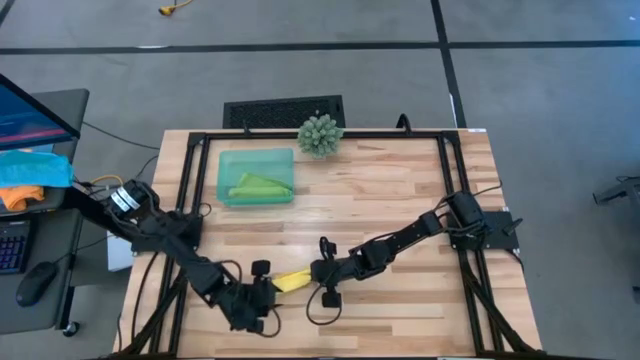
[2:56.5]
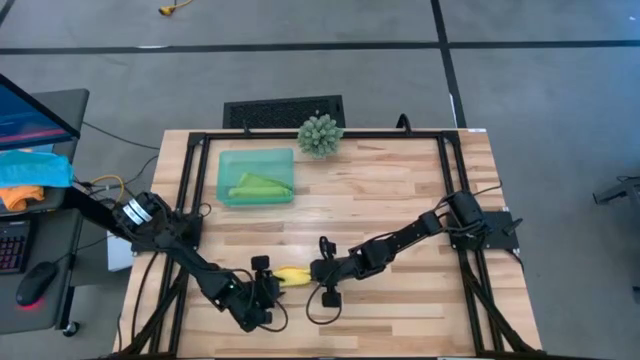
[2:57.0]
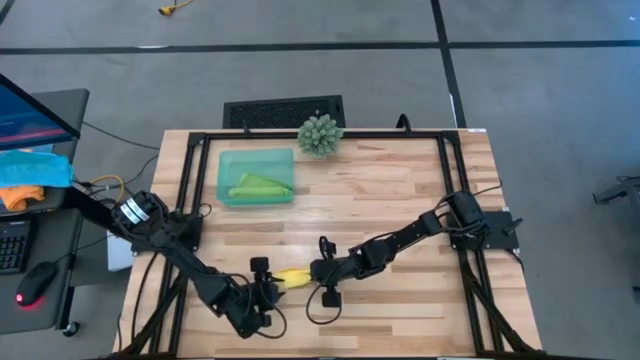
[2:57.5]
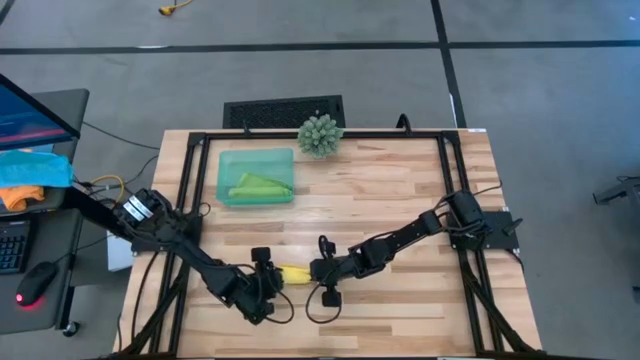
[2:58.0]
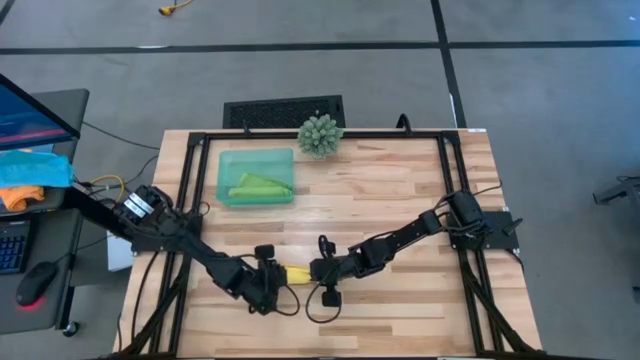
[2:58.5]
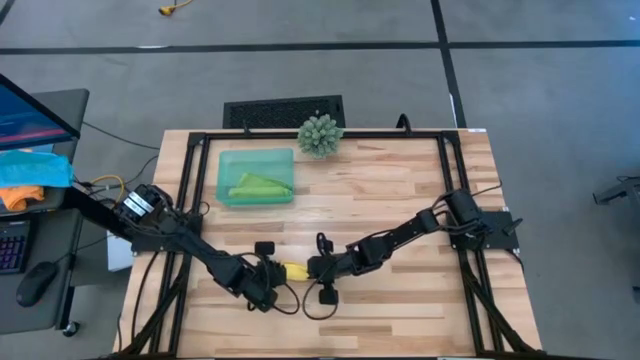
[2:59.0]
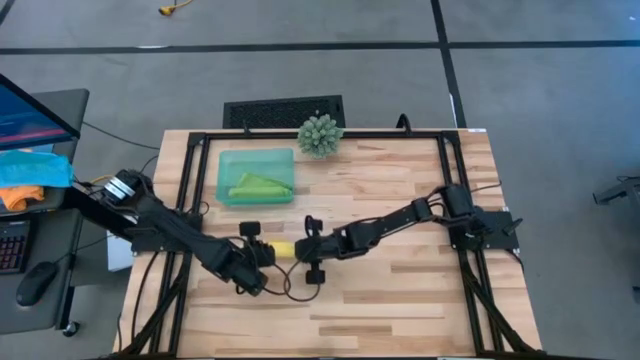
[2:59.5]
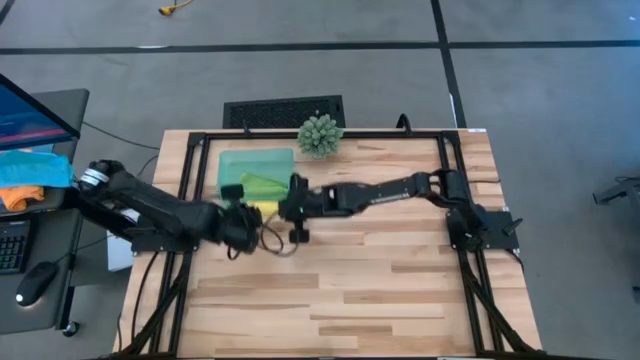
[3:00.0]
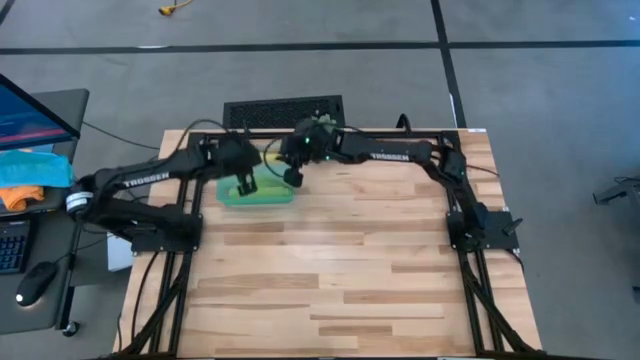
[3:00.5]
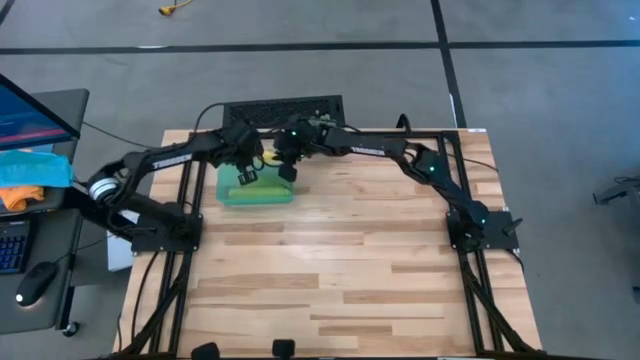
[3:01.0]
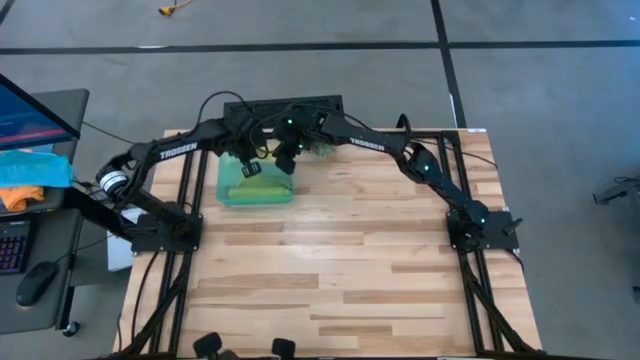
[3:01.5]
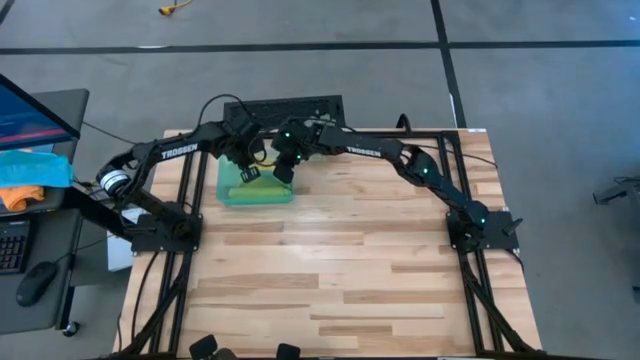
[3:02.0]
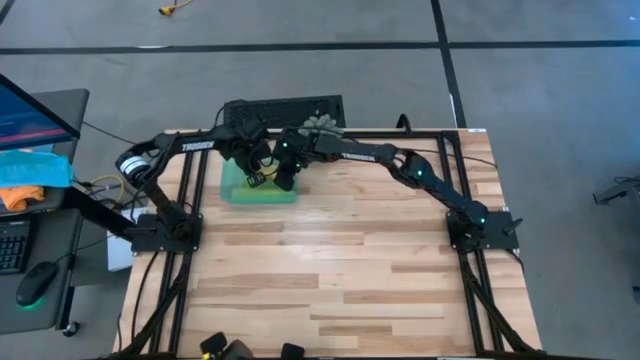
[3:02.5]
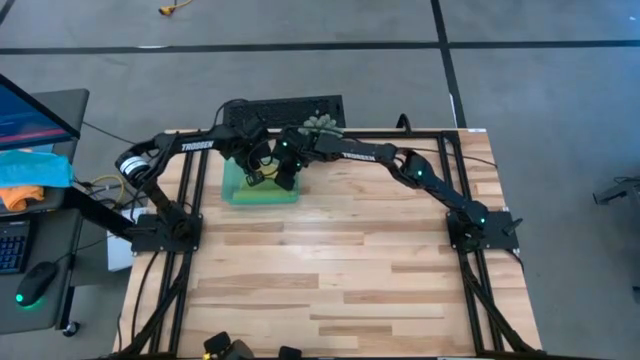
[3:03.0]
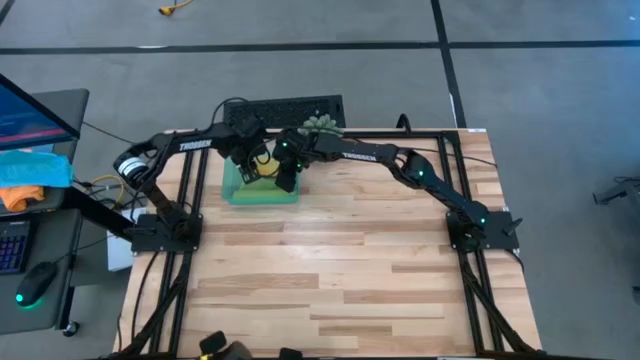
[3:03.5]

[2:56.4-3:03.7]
Task: Roll microfiber towels into tight, uniform cylinder then place into a basket
Put the rolled yellow towel into the green bin

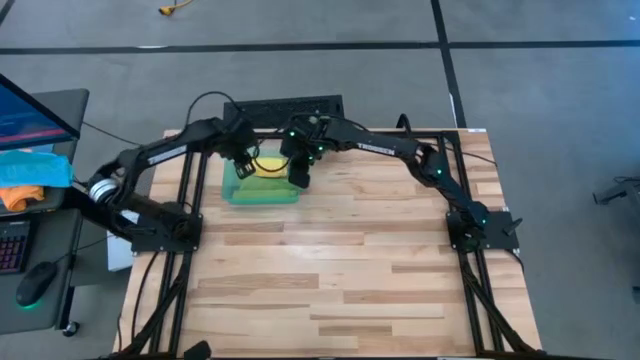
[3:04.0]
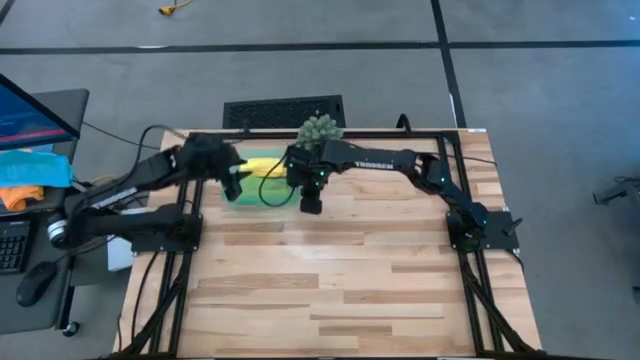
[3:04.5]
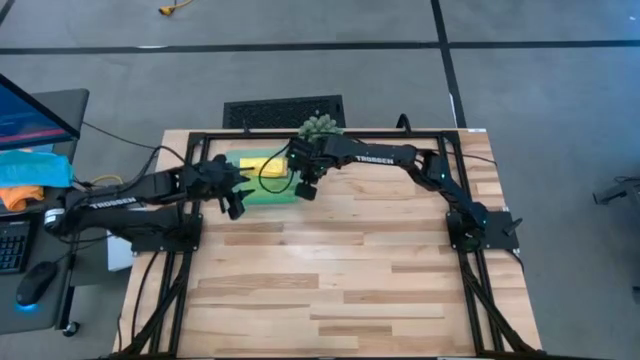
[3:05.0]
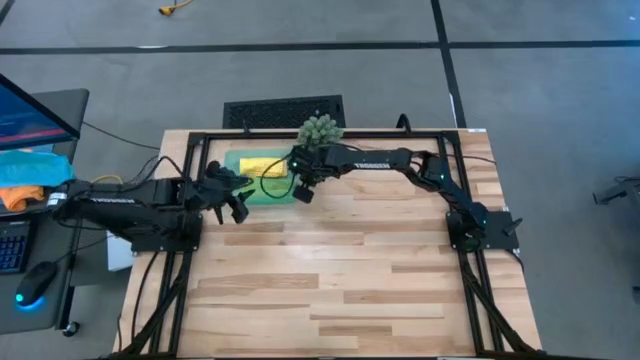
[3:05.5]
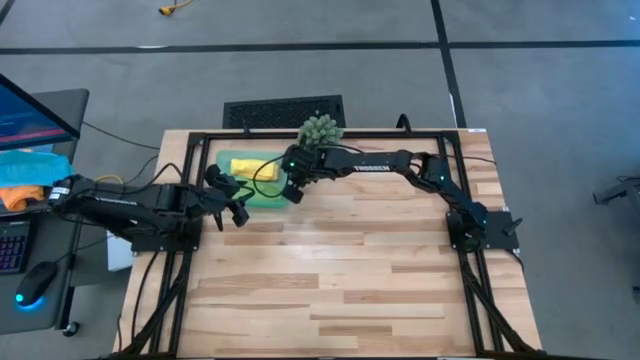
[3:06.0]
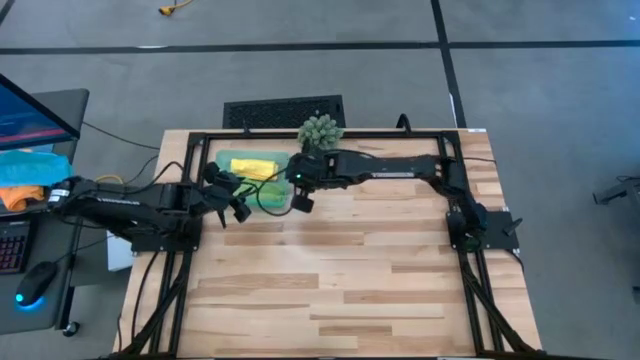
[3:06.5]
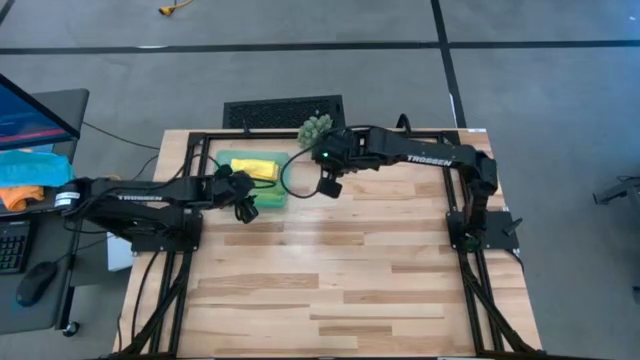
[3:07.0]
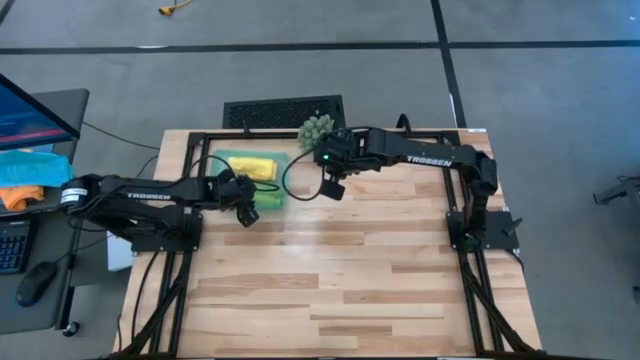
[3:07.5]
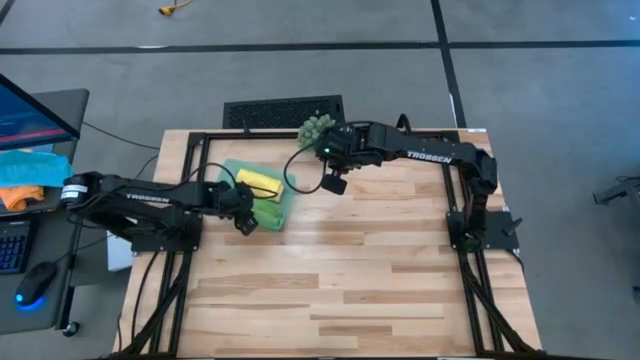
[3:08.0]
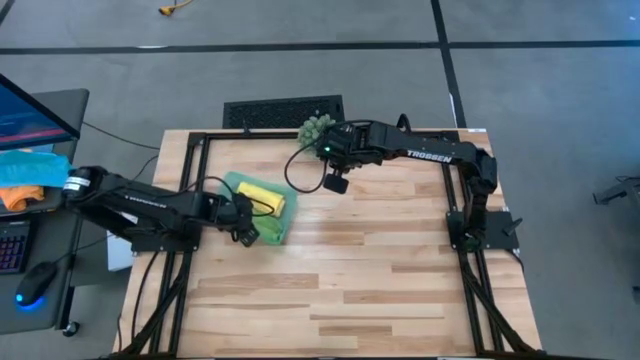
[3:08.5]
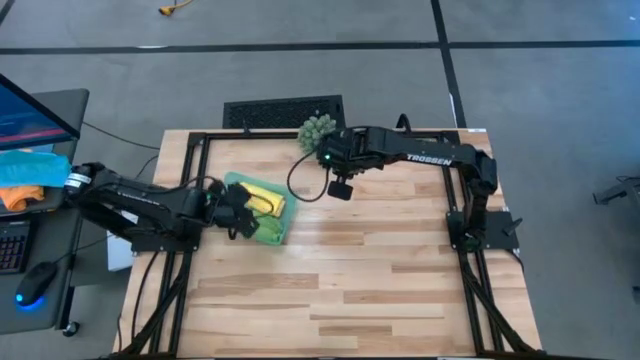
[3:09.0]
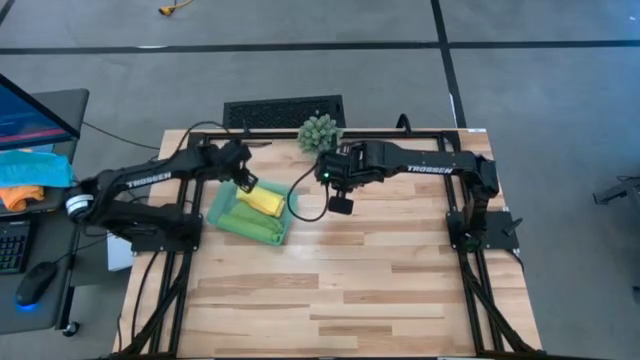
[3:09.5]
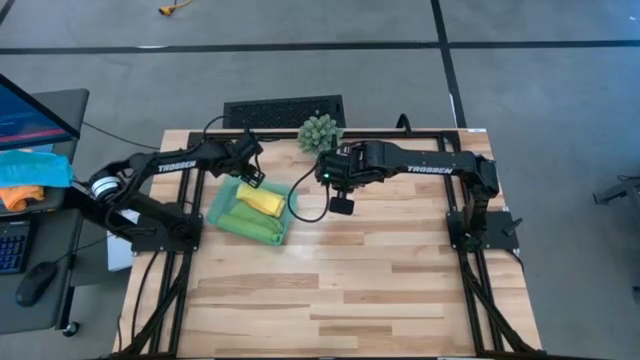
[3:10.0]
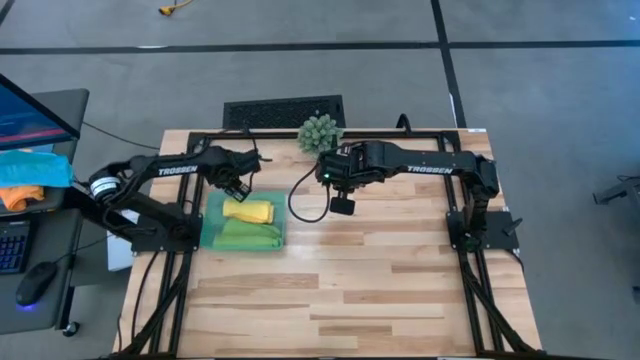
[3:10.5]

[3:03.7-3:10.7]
Move the green bin to the middle left of the table

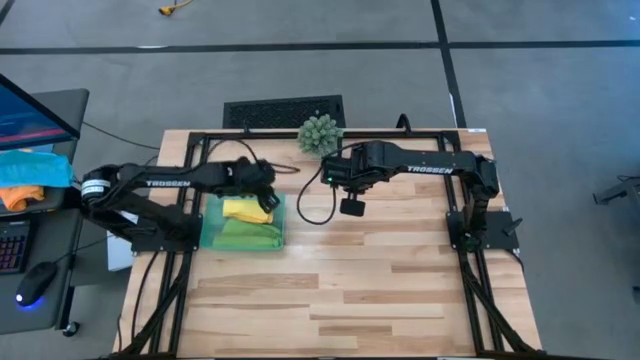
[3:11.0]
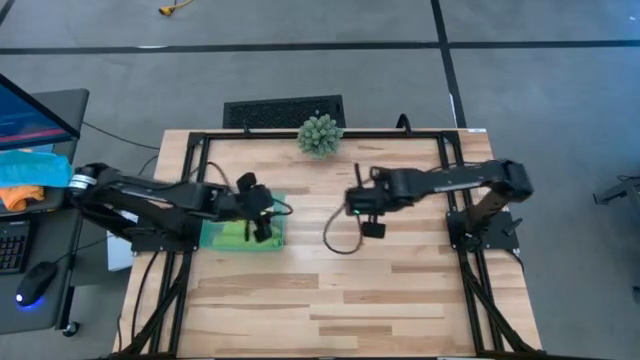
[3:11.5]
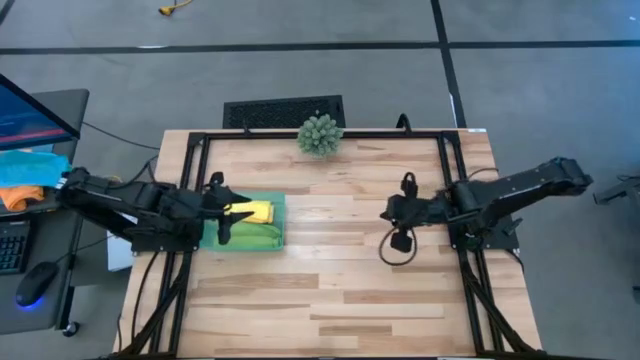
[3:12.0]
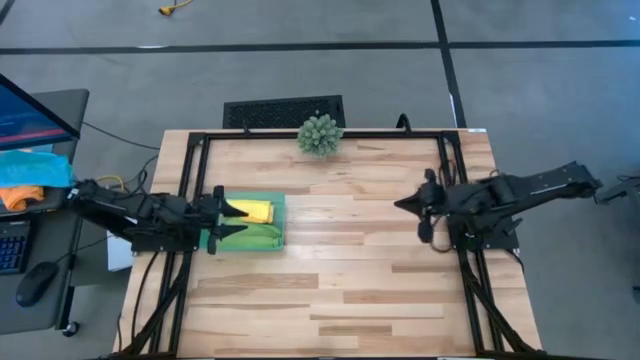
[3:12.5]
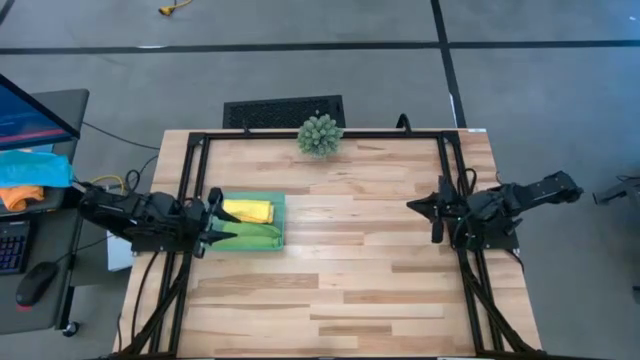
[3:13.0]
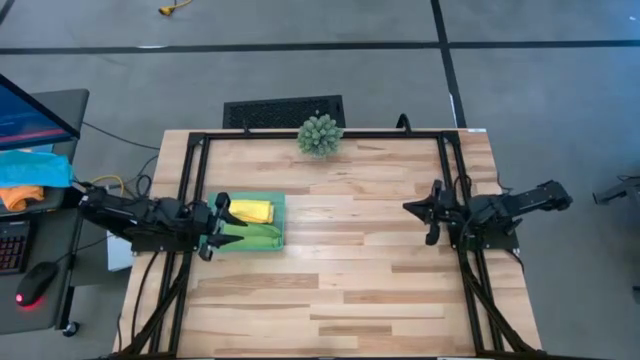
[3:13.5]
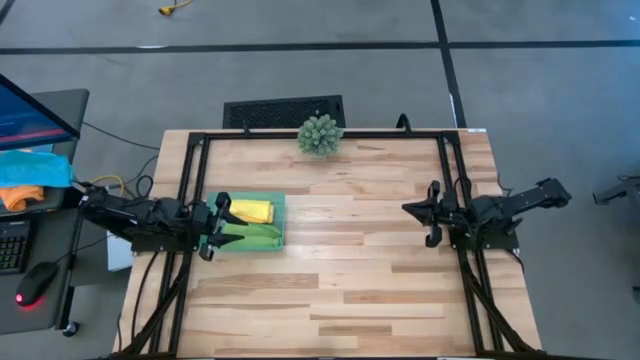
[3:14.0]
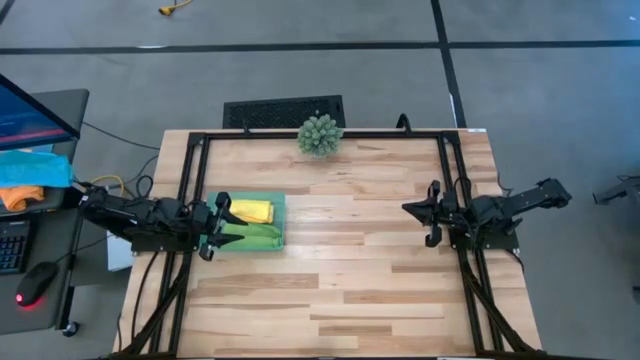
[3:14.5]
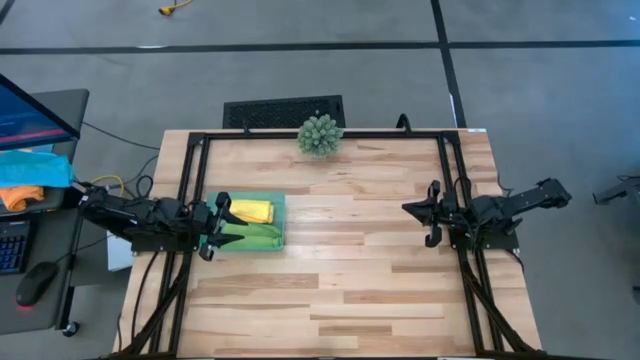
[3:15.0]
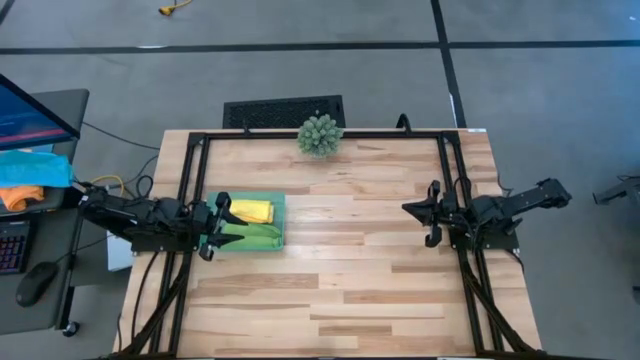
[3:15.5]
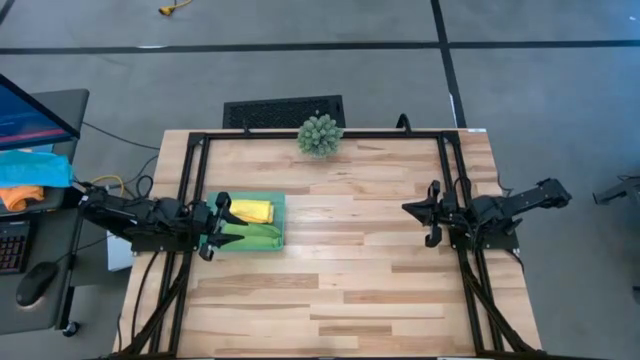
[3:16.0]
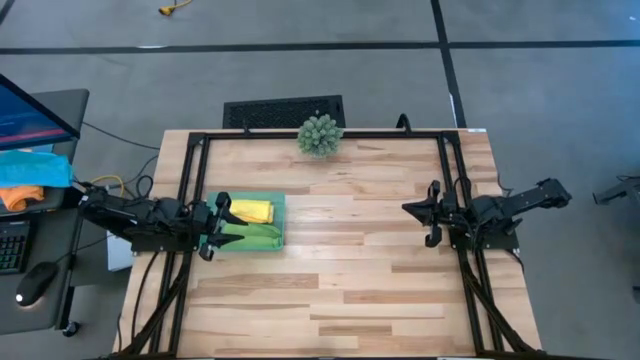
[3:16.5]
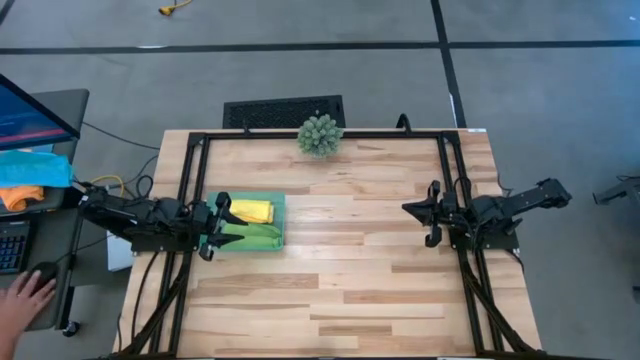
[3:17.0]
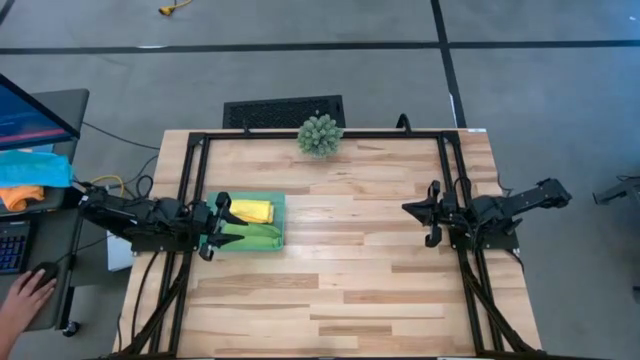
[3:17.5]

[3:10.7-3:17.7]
Return to Home Position
